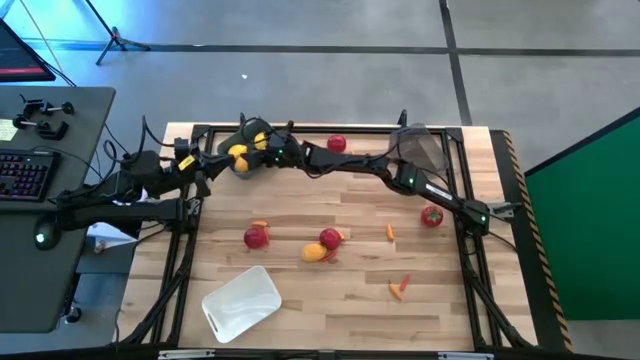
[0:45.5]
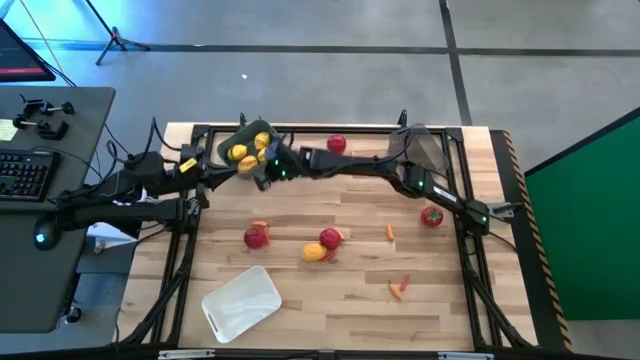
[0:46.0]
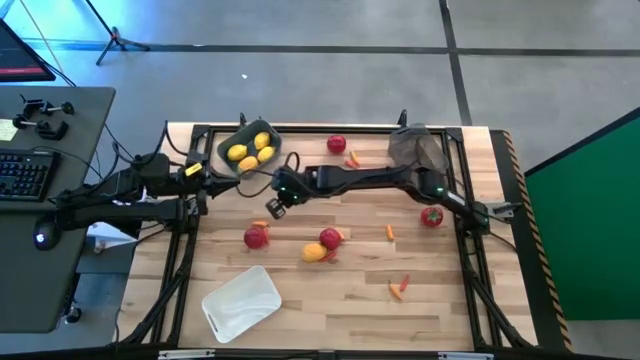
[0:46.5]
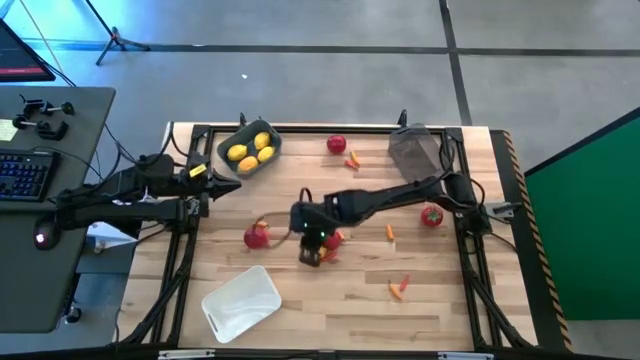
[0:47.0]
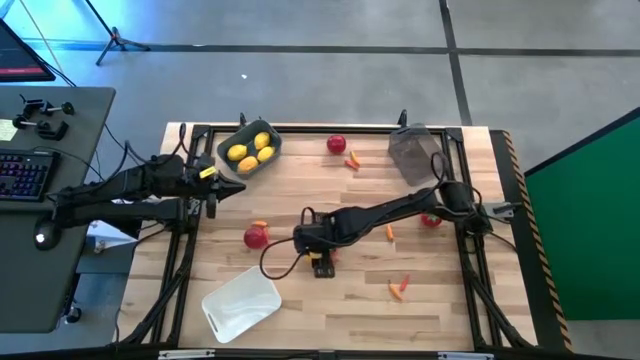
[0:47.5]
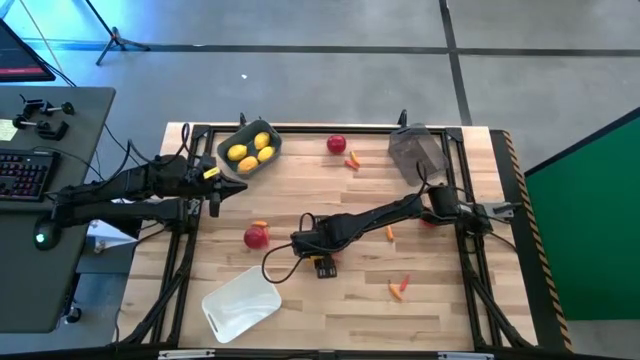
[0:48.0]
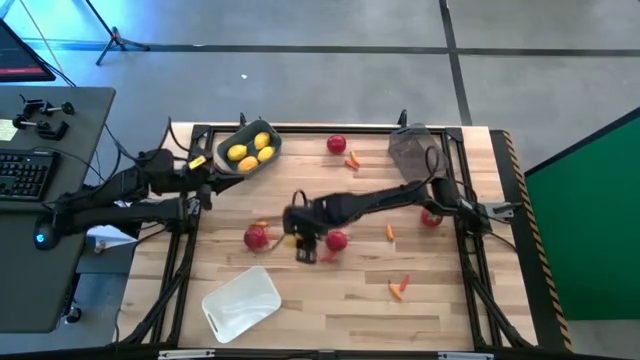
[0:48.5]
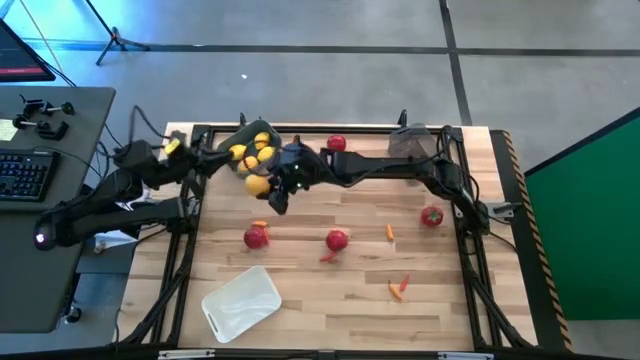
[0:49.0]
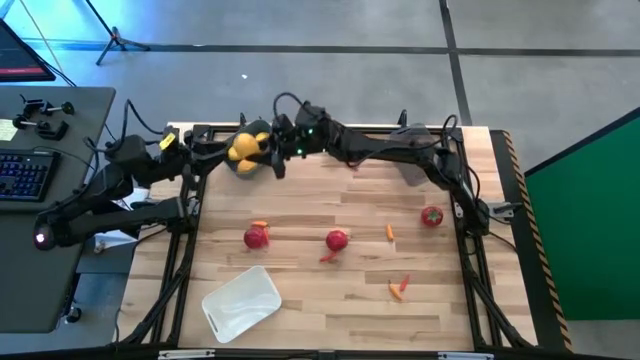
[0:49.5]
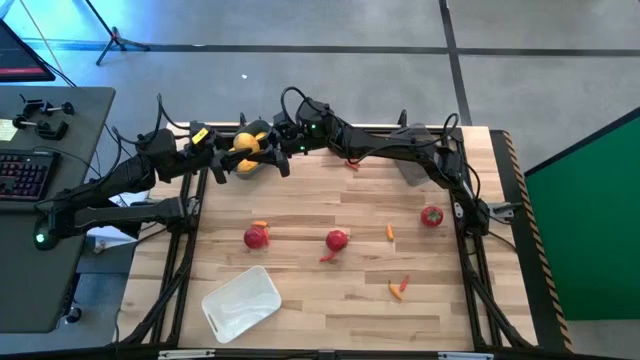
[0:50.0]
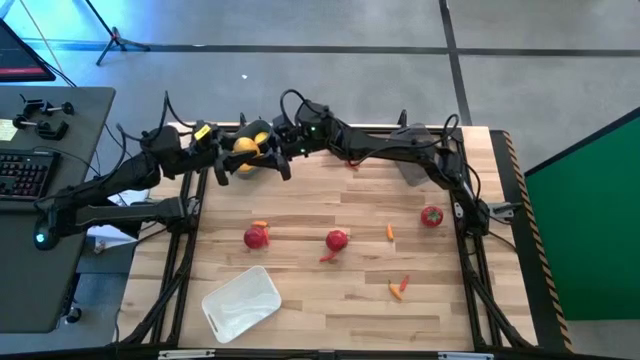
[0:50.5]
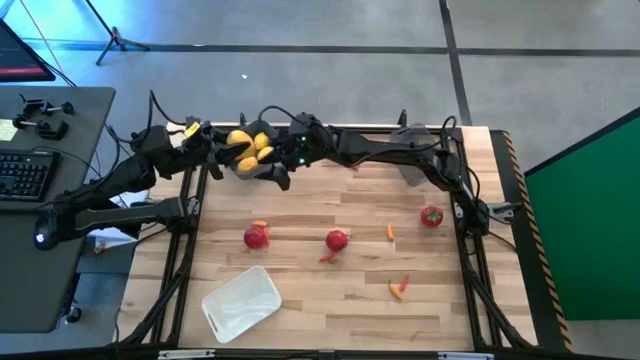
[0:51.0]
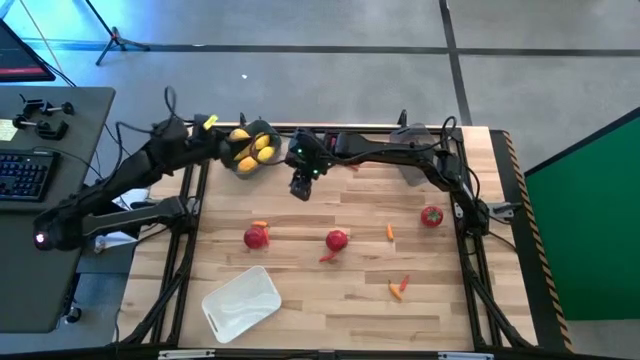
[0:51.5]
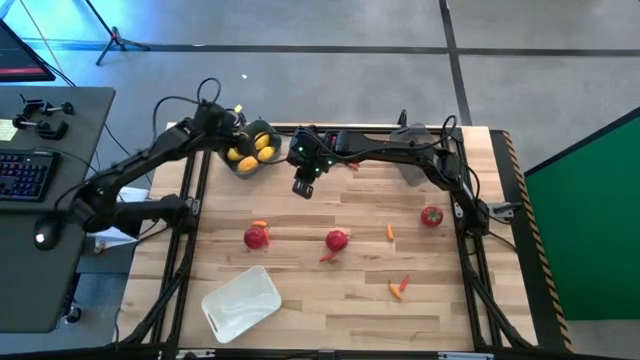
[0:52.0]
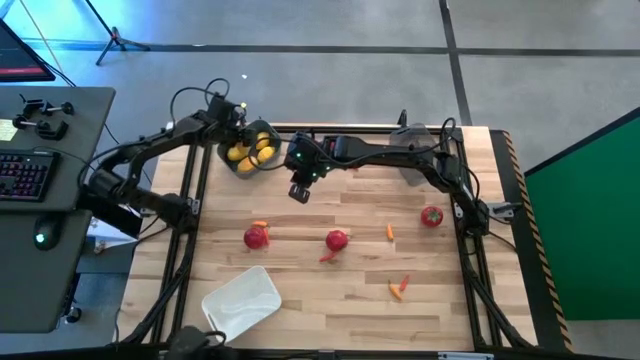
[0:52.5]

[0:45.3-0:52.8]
Task: Sort produce into baskets
Put the yellow lemon into the blue bin

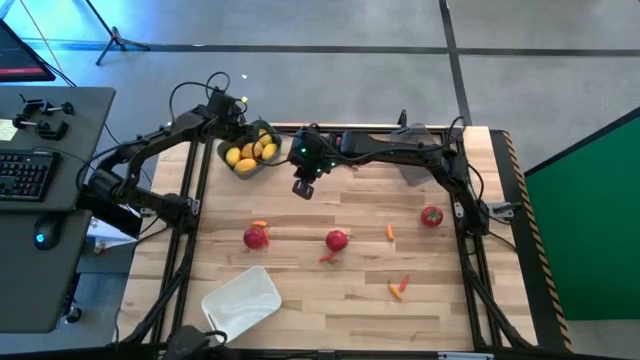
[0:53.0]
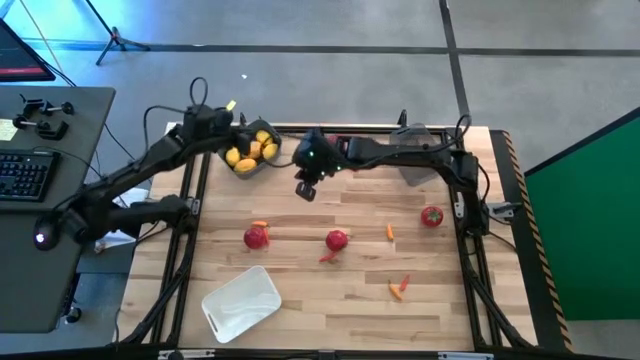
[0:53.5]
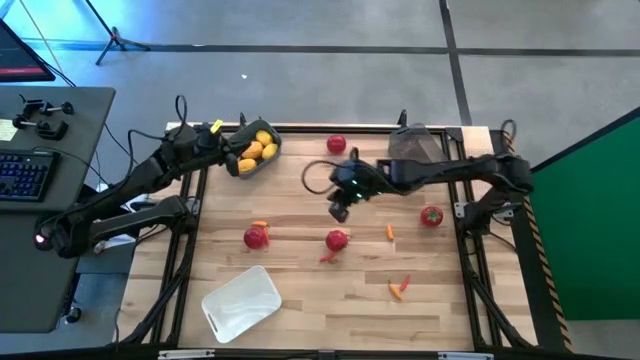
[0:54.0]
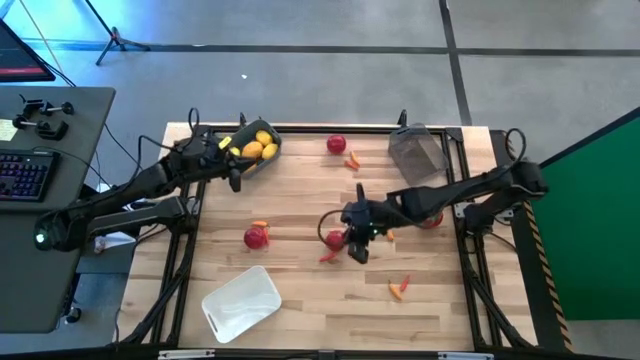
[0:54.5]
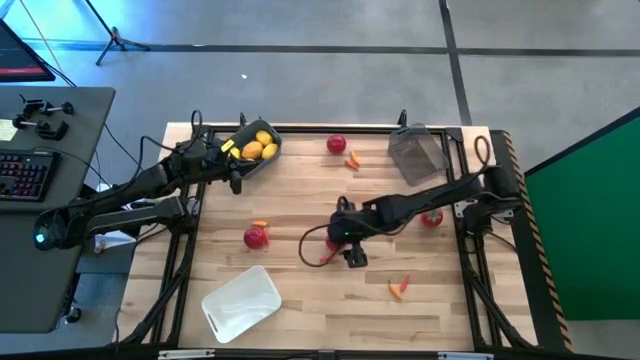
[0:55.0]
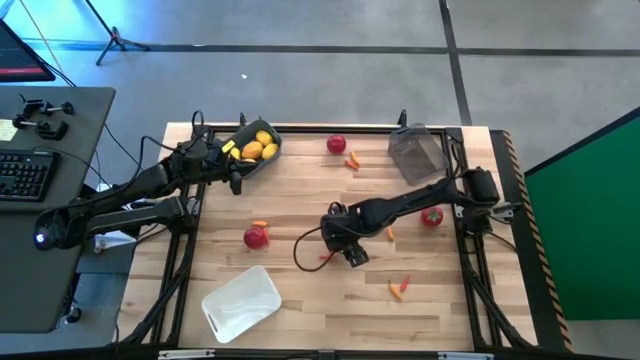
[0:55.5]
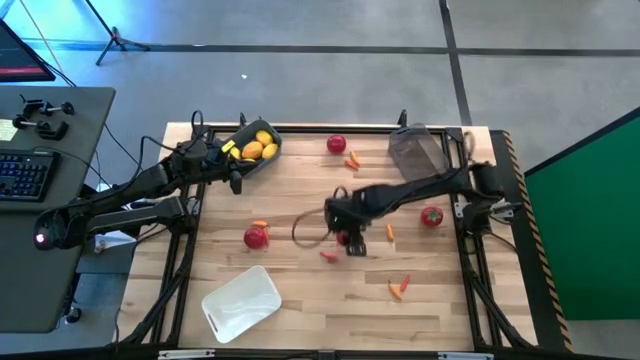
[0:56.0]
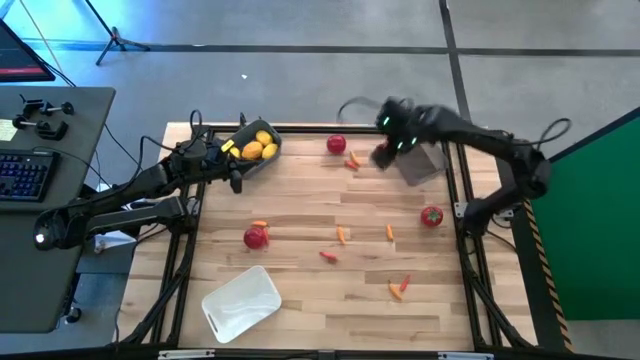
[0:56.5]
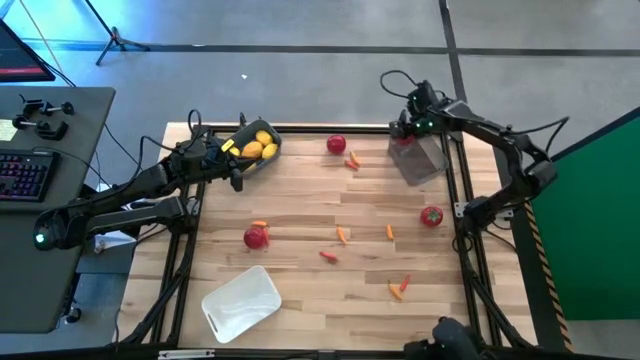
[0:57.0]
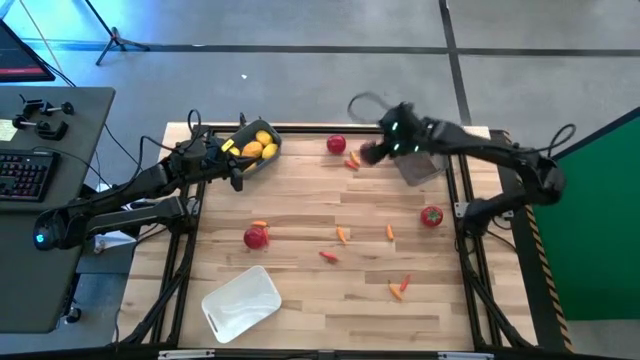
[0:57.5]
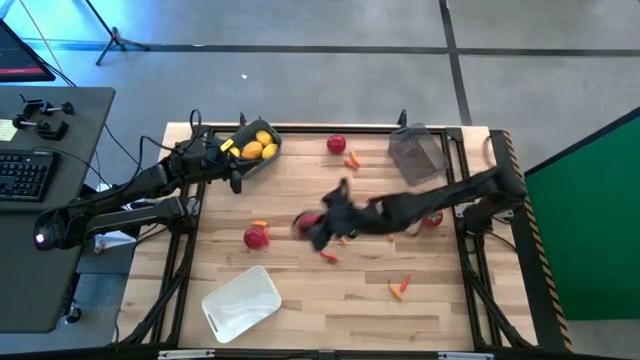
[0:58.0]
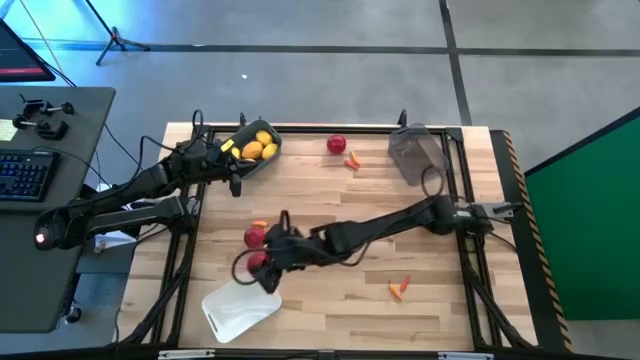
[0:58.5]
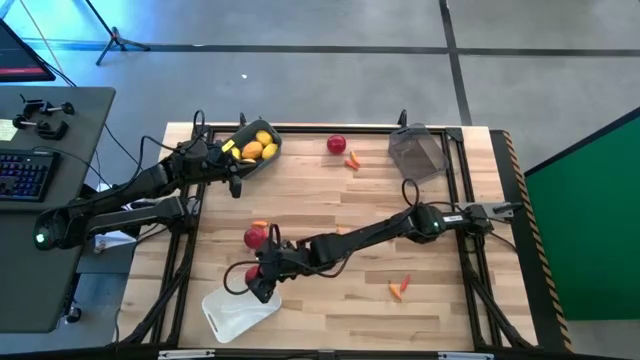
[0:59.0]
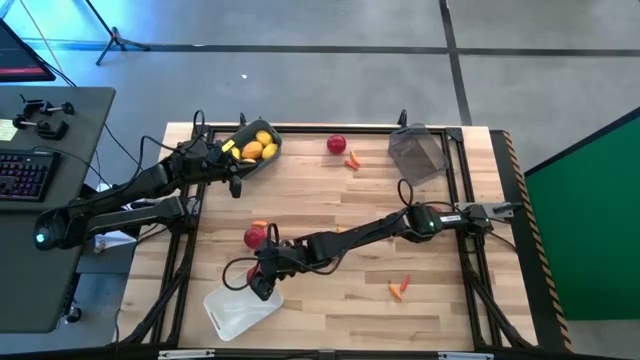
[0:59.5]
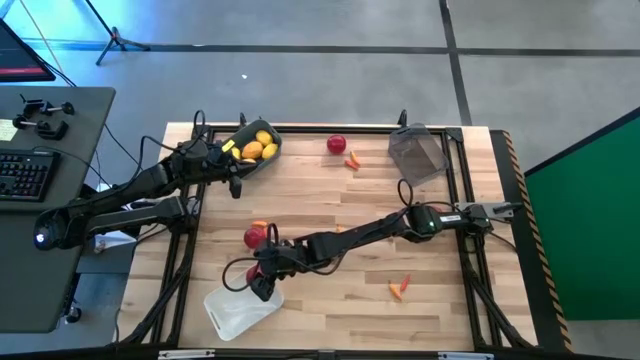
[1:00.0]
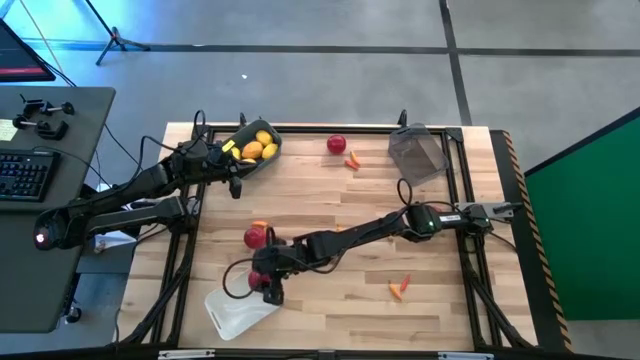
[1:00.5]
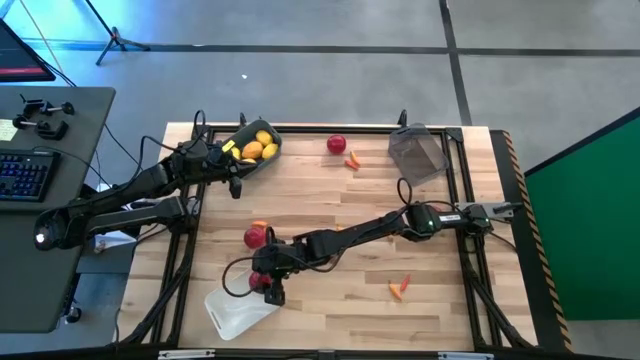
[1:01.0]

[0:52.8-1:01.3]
Put the red tomato into the white bin

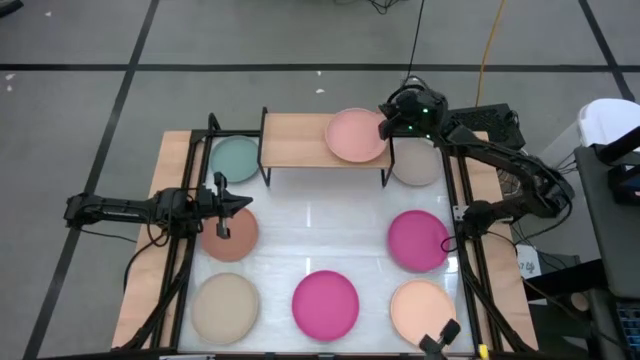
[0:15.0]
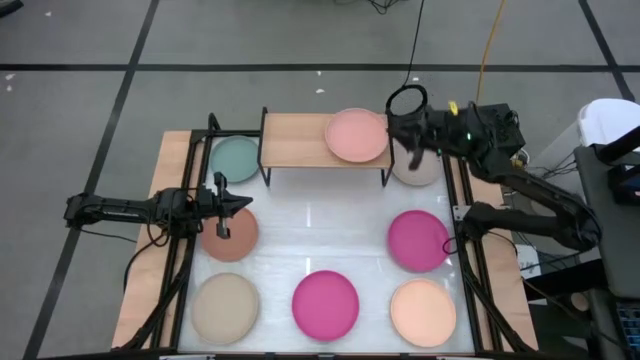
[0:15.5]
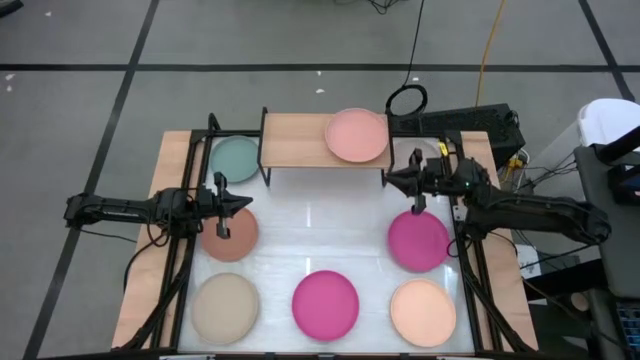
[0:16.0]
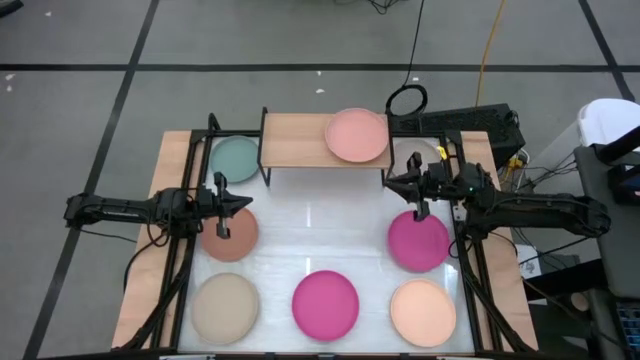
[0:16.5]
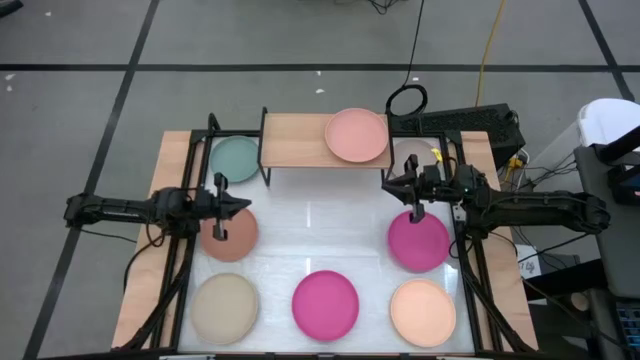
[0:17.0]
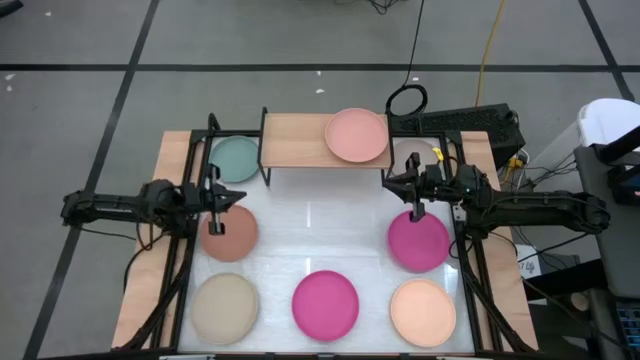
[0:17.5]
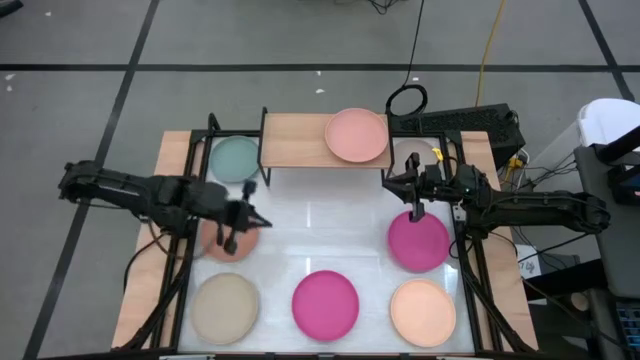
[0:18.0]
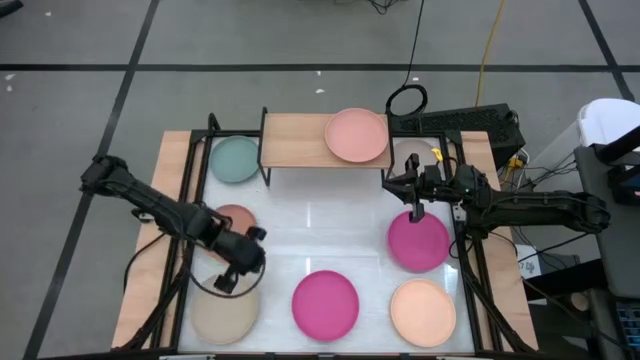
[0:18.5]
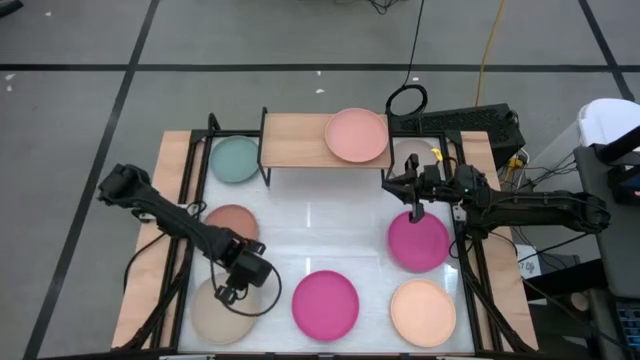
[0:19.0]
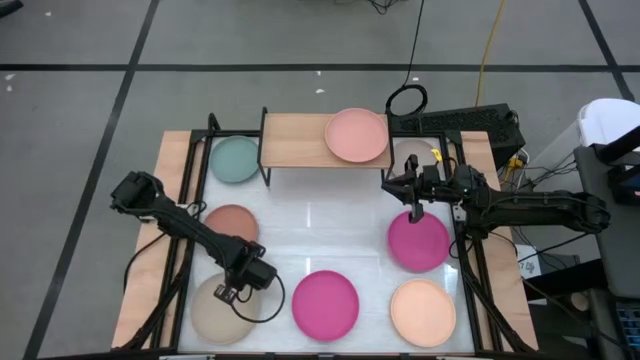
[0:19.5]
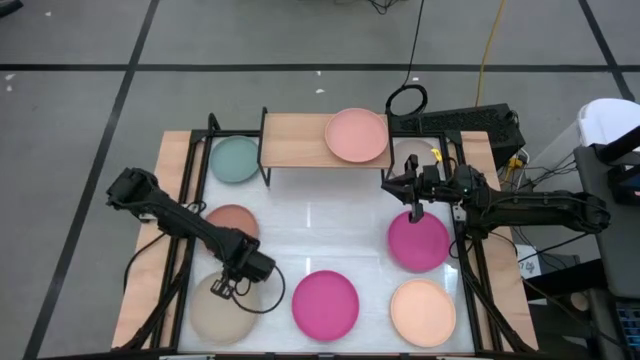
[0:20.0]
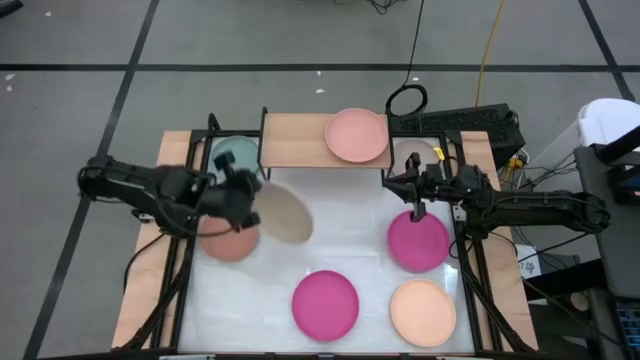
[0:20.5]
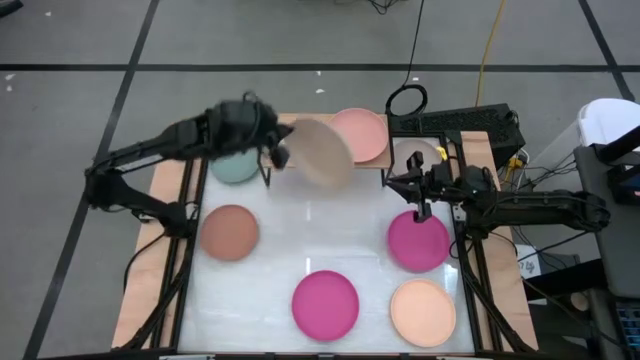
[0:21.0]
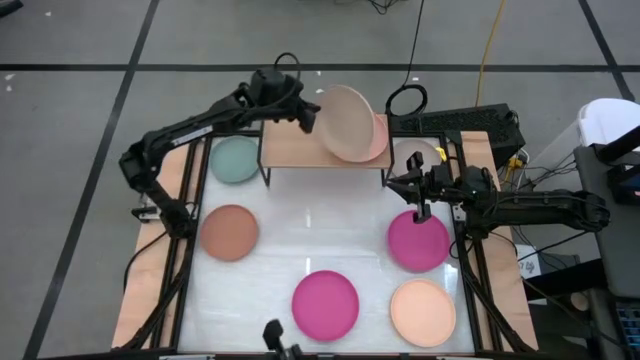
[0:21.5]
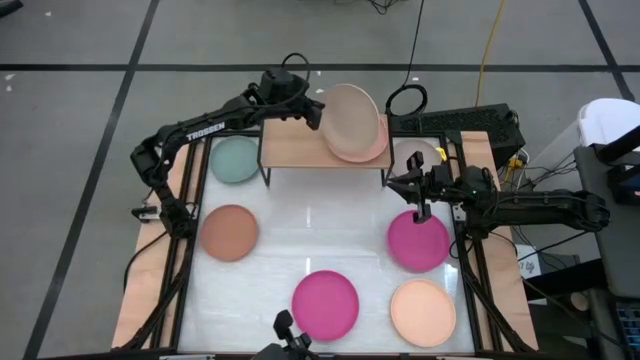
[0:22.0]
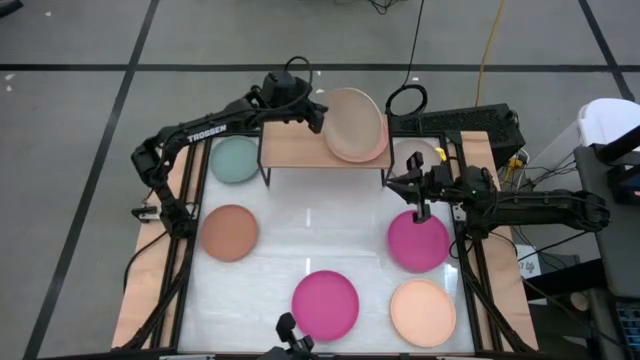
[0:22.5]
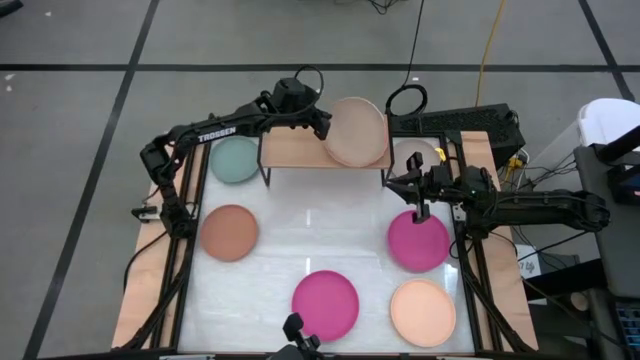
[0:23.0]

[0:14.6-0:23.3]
Task: Place and stack plates onto a shelf
Stack the bottom light brown plate on top of the light pink plate on the shelf
